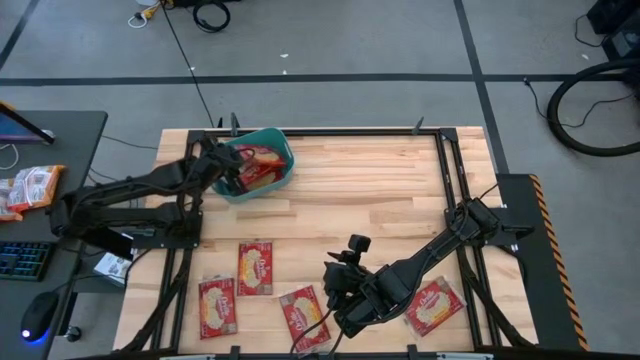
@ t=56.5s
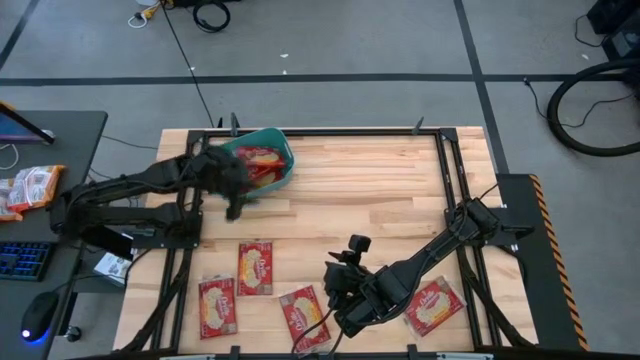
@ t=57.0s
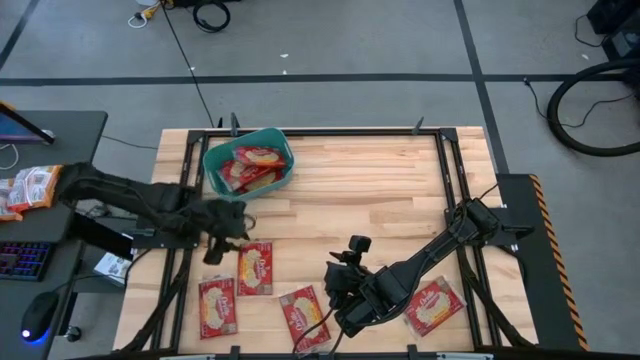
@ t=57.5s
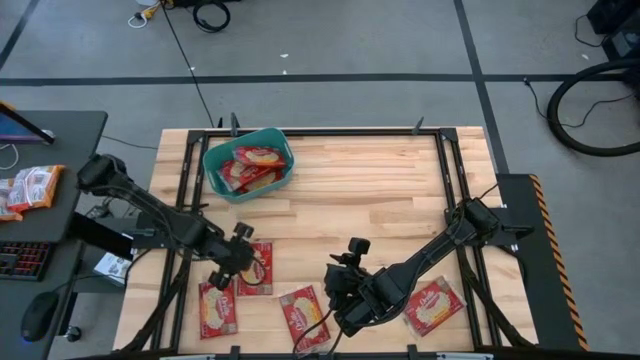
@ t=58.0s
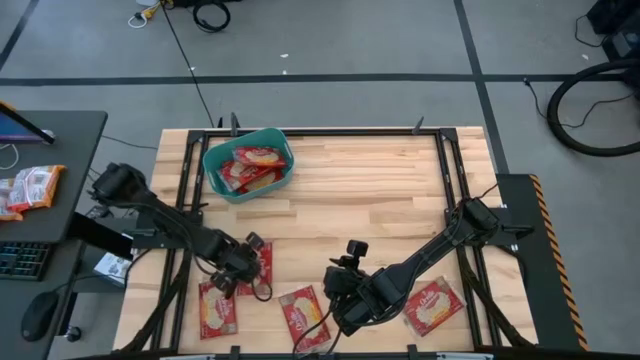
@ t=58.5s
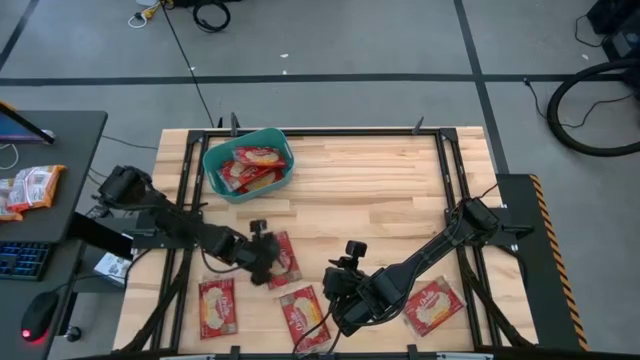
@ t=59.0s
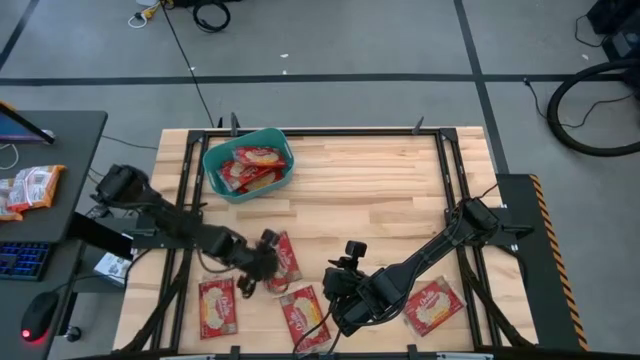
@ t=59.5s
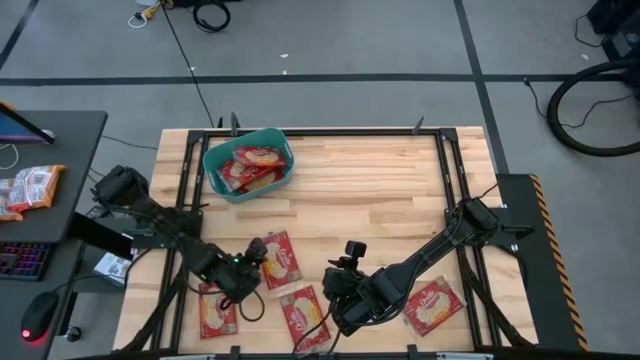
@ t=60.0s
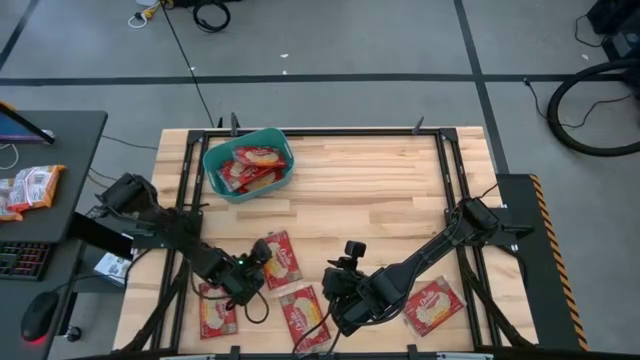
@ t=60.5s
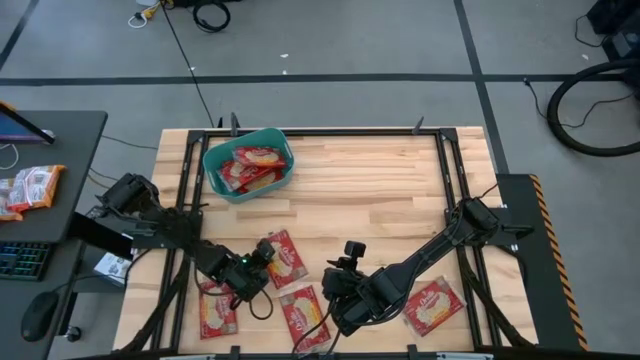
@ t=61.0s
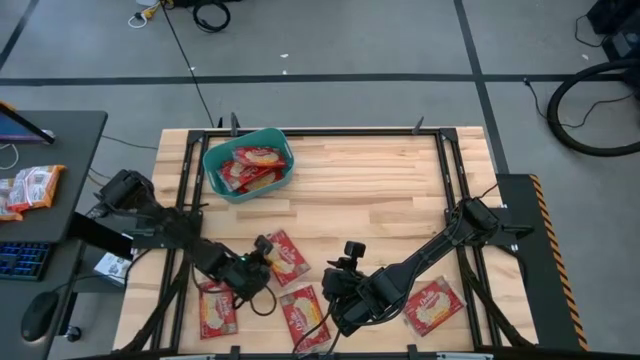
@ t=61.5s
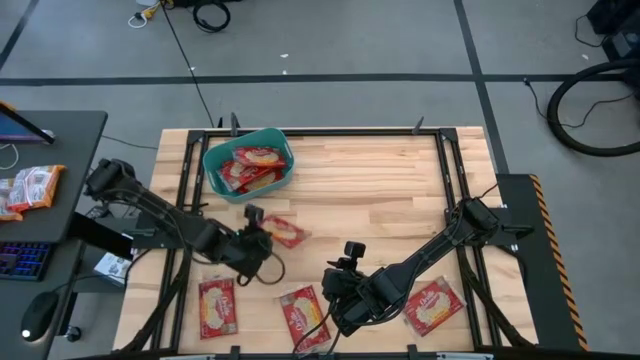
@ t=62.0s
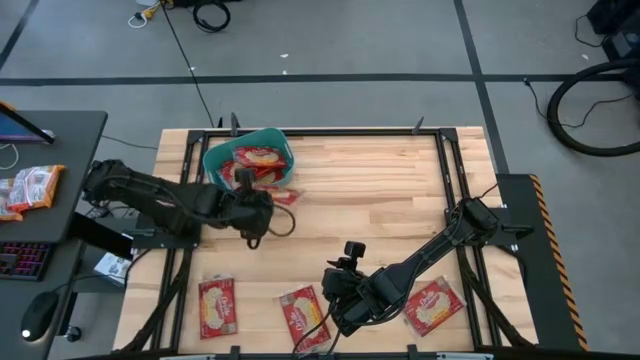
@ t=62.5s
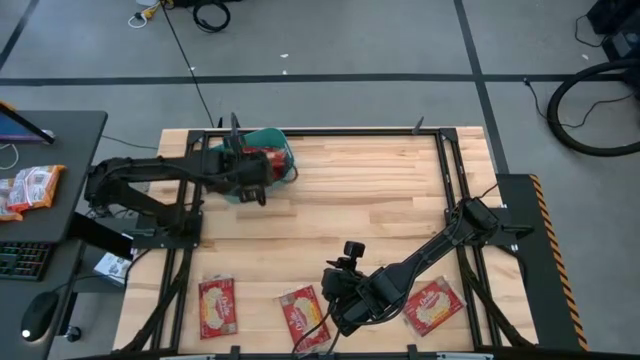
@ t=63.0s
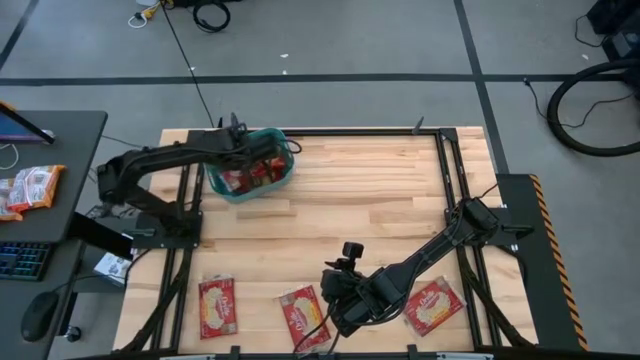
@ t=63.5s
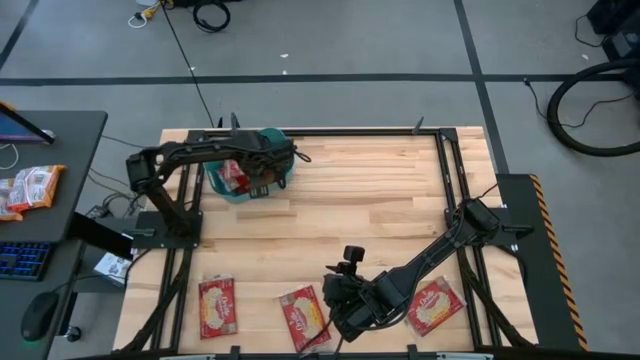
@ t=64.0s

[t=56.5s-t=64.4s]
Task: Sort popcorn bags into baskets
Put the popcorn bag into the bin

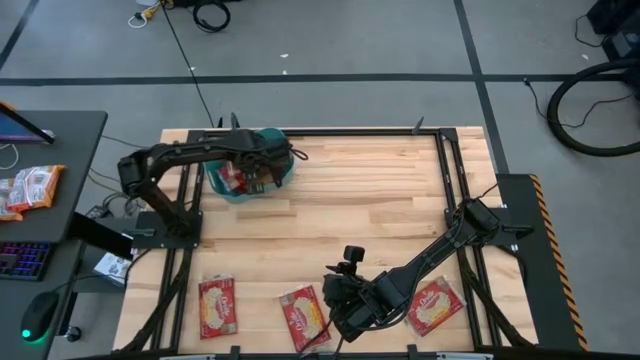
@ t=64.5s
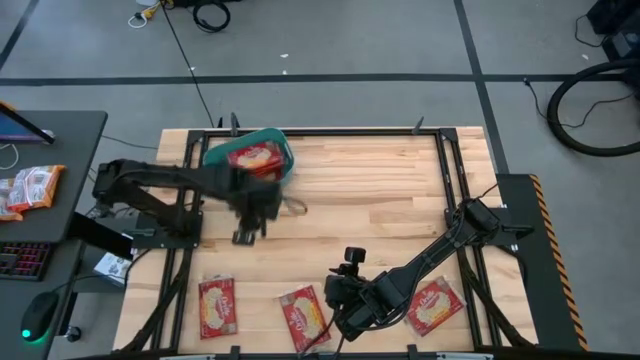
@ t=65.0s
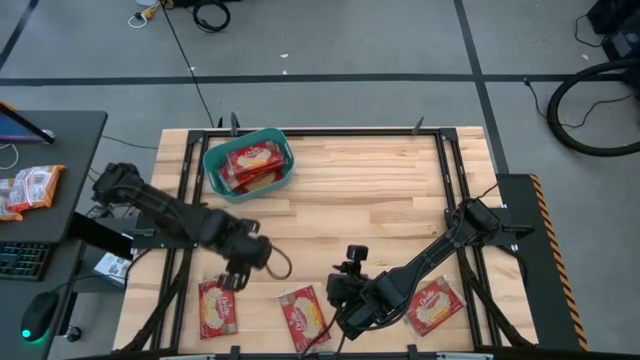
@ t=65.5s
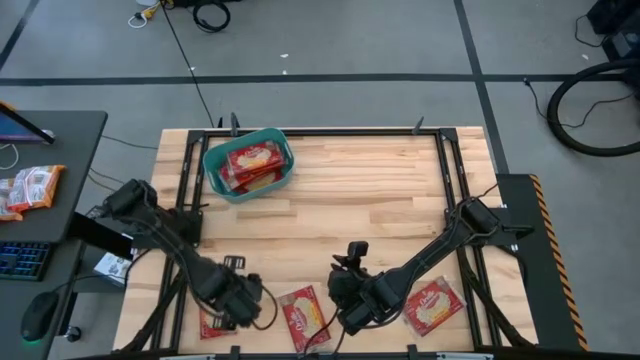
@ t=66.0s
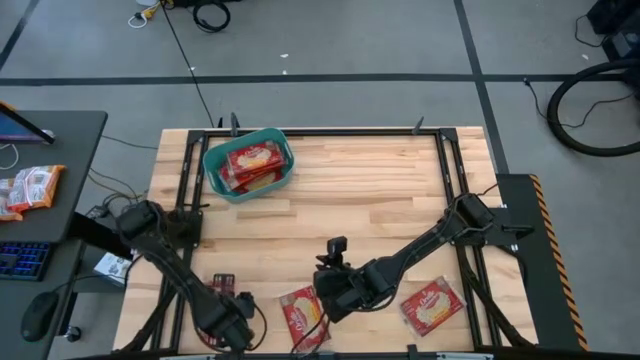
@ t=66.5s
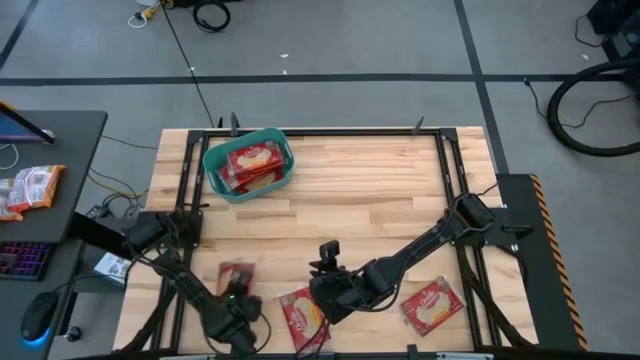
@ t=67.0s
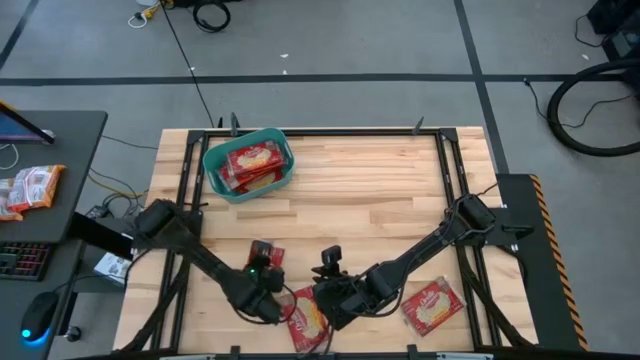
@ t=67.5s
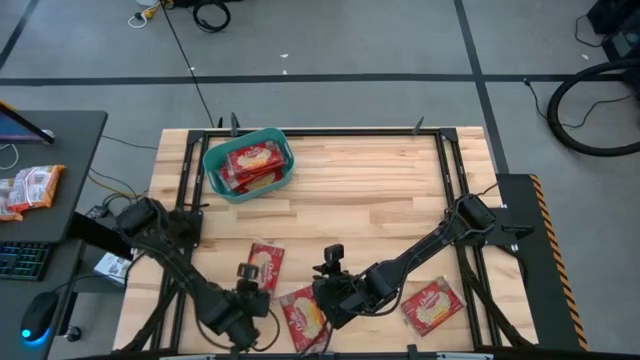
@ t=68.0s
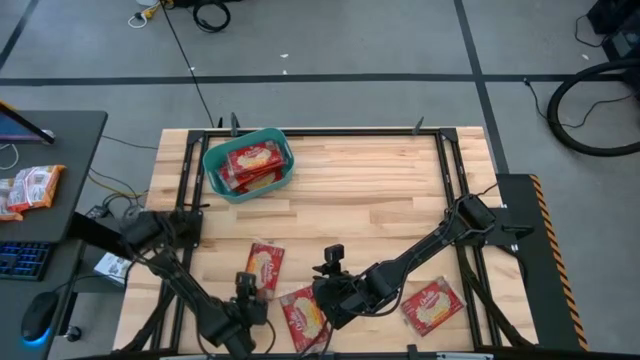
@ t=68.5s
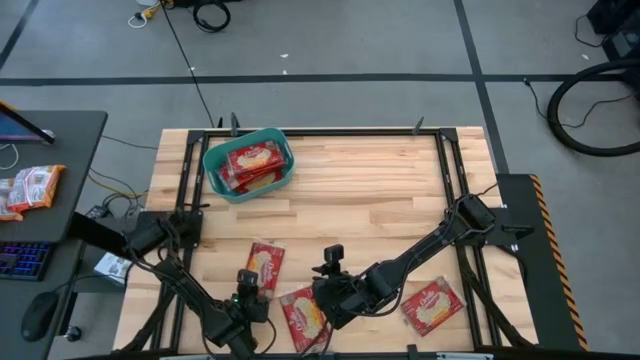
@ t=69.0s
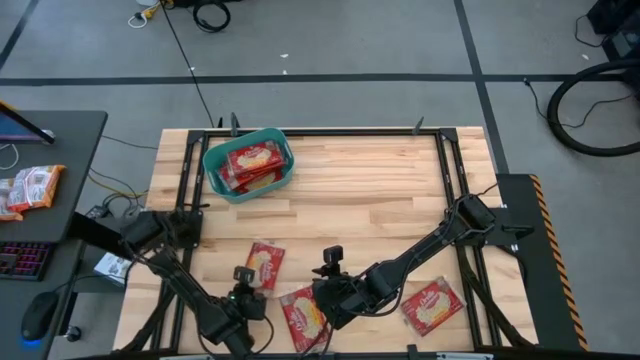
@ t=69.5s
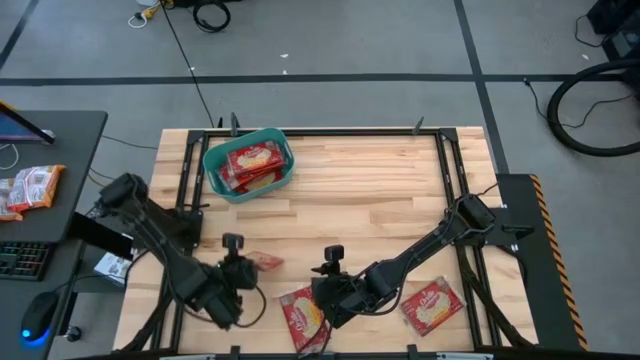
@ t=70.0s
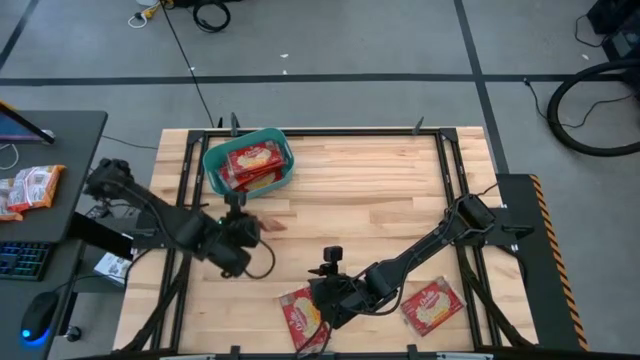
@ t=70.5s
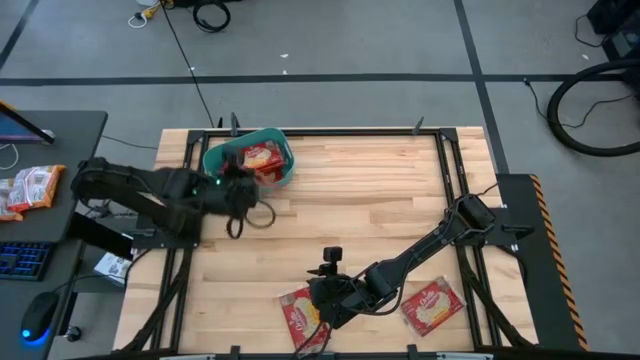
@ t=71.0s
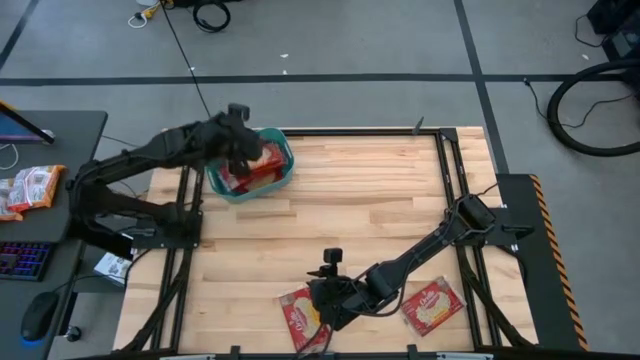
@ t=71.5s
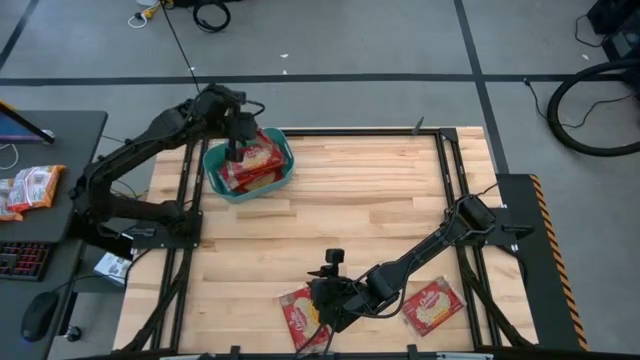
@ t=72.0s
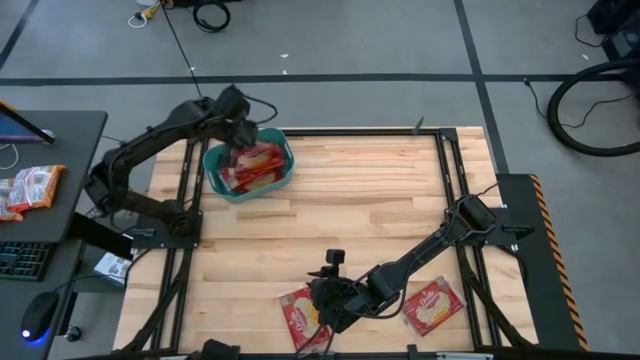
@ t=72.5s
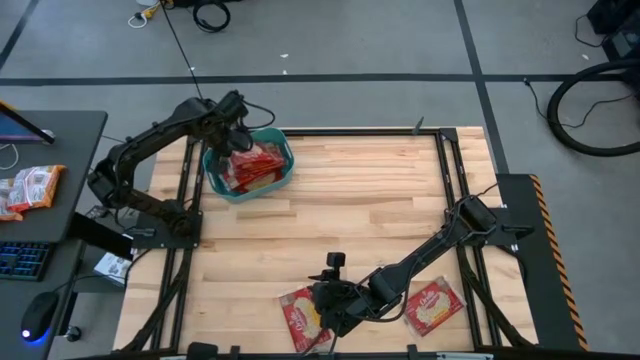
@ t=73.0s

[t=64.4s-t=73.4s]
Put the left popcorn bag into the bin

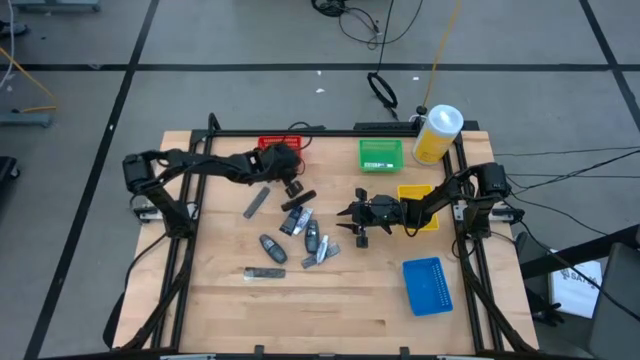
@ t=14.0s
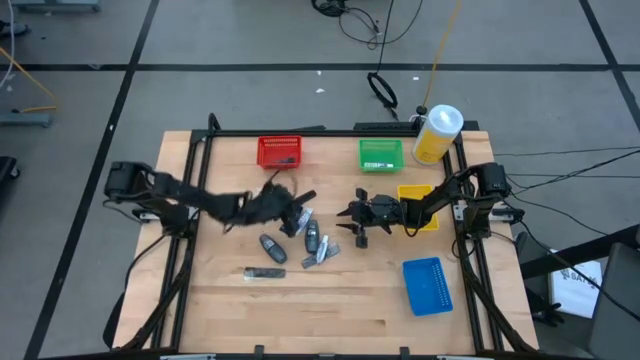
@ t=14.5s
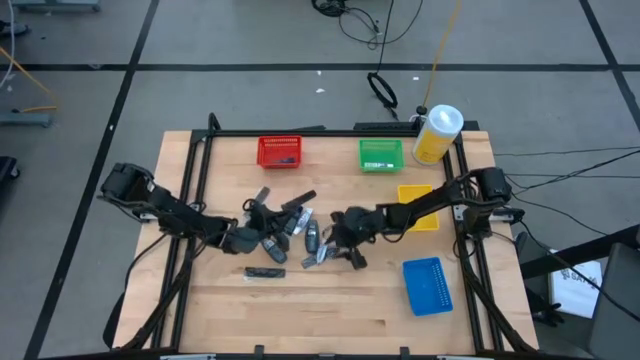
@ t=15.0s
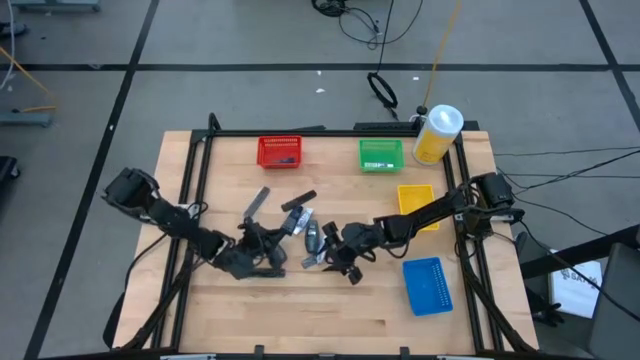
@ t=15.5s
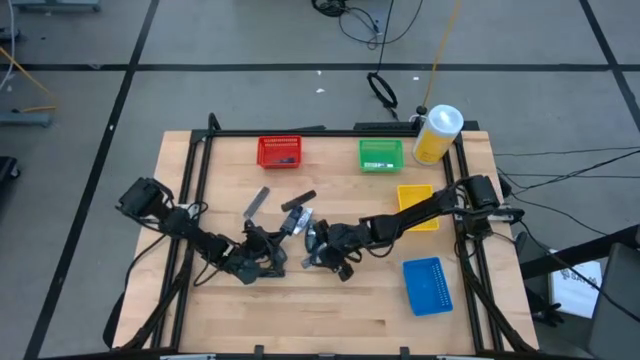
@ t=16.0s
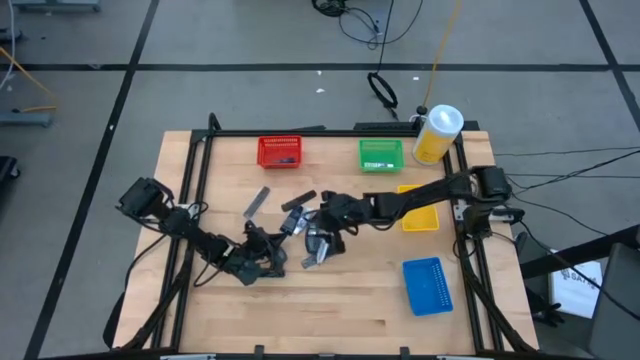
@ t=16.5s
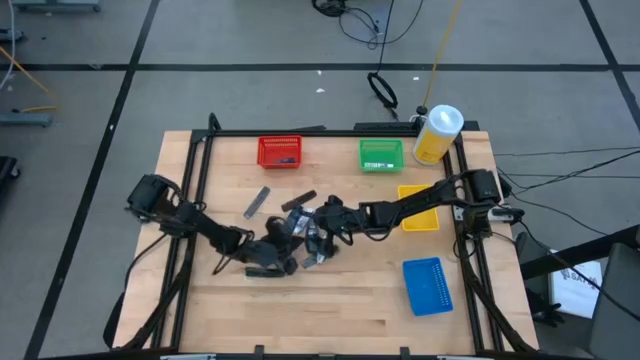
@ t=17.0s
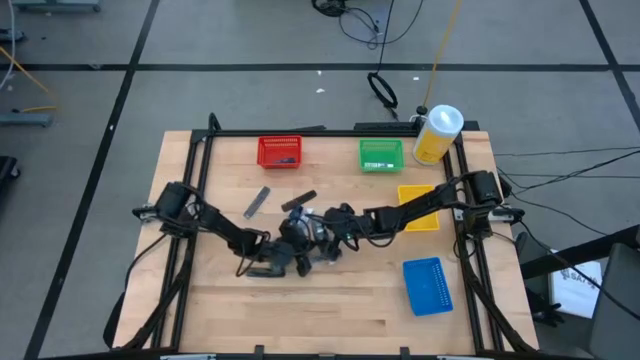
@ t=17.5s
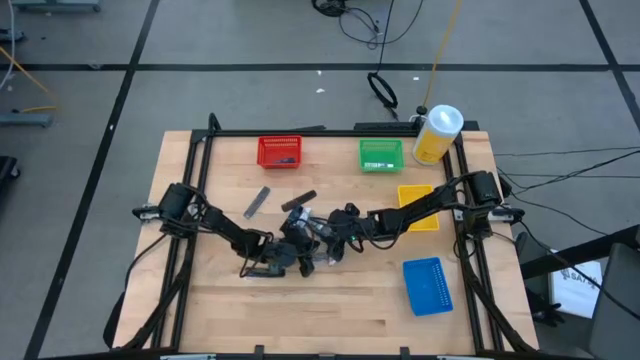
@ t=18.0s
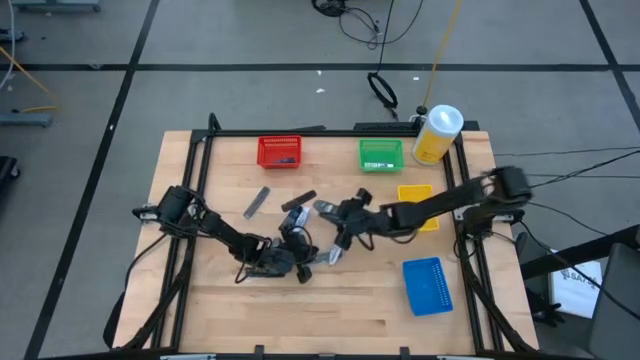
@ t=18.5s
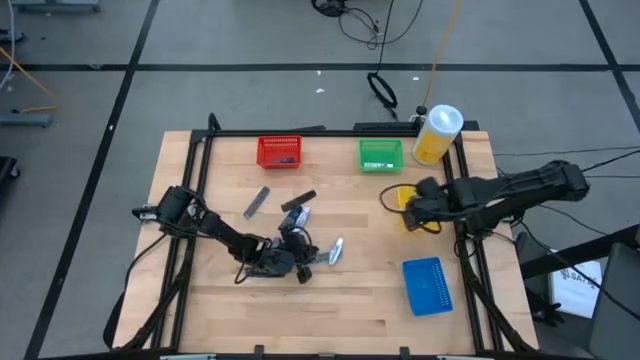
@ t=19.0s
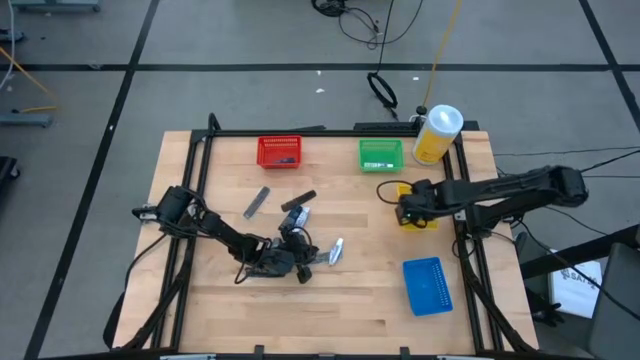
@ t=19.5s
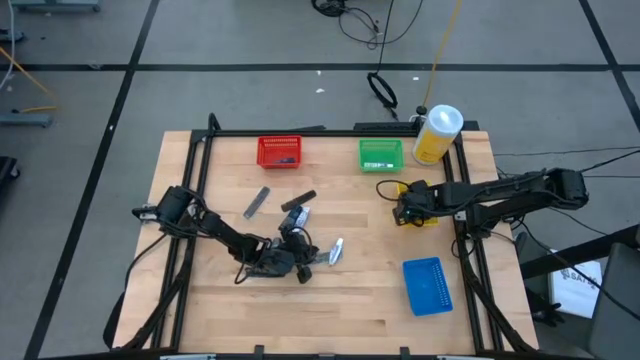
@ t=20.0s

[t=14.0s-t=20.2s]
Task: Pick & Place Travel size toiletries
Put the gray deodorant into the yellow bin
